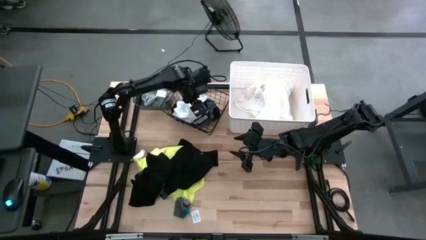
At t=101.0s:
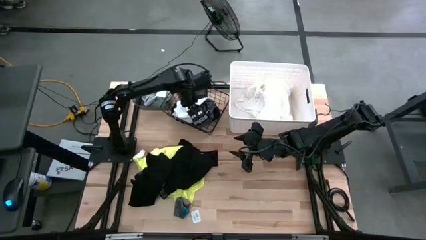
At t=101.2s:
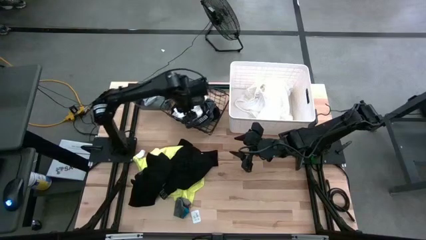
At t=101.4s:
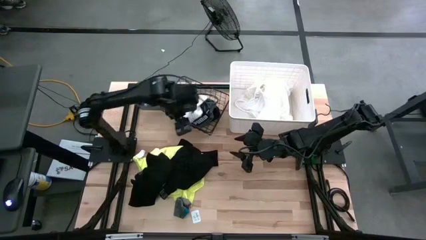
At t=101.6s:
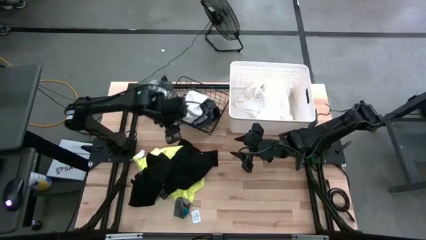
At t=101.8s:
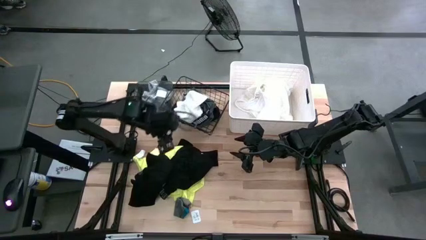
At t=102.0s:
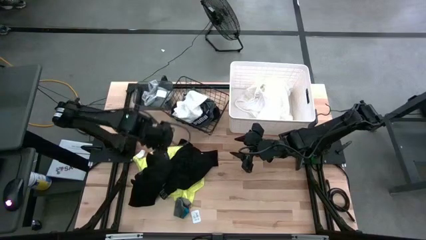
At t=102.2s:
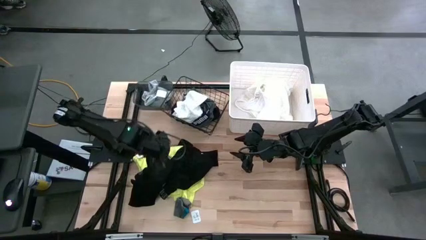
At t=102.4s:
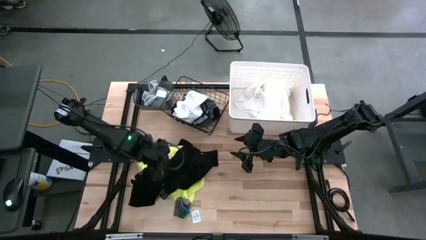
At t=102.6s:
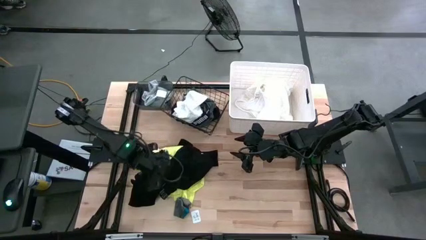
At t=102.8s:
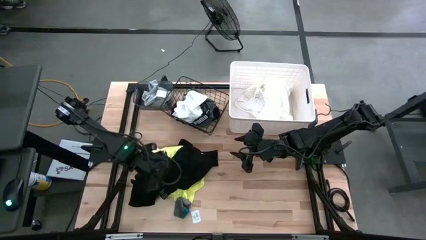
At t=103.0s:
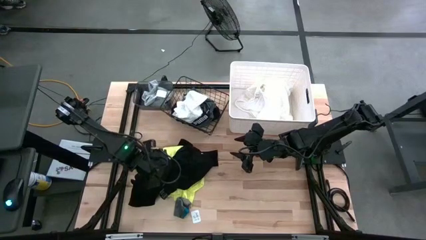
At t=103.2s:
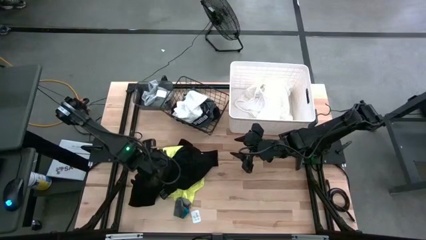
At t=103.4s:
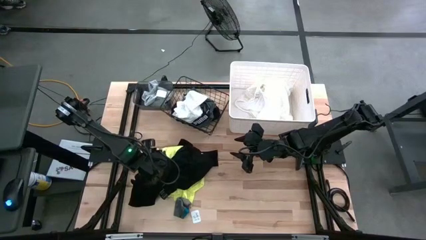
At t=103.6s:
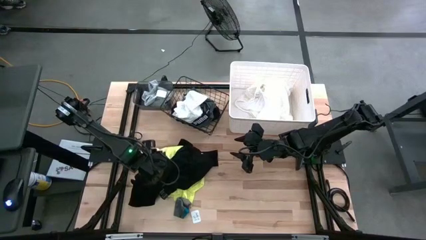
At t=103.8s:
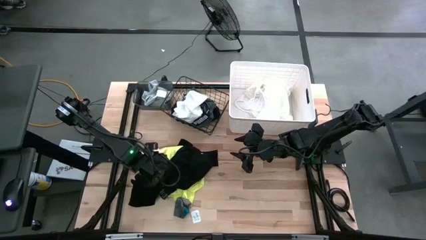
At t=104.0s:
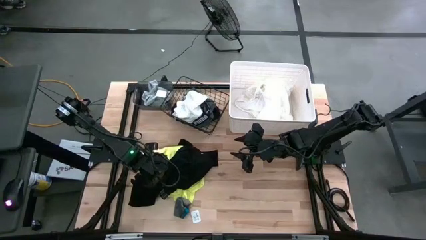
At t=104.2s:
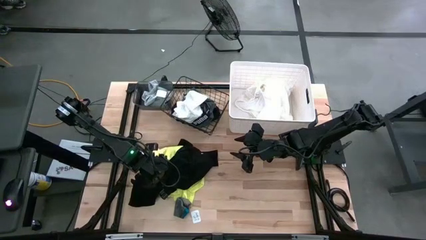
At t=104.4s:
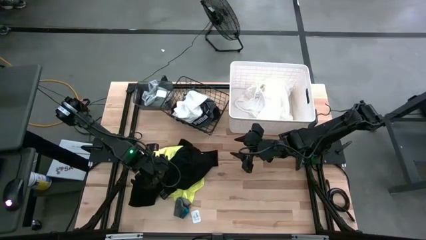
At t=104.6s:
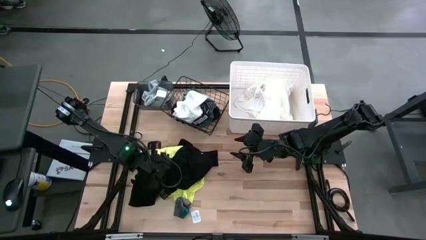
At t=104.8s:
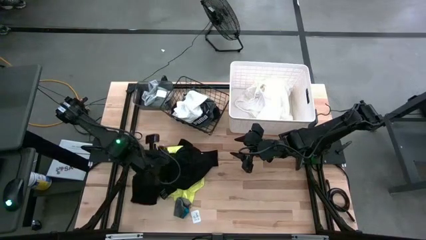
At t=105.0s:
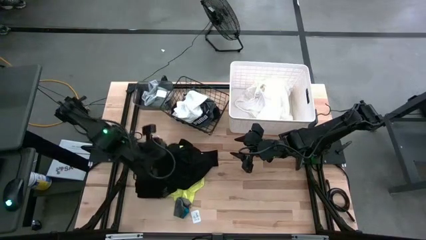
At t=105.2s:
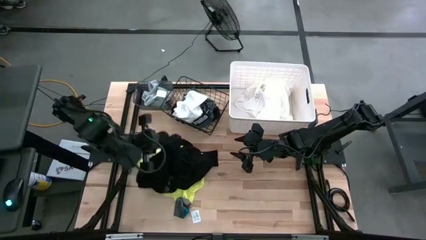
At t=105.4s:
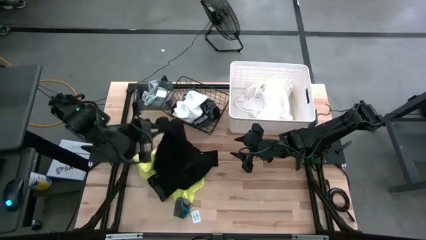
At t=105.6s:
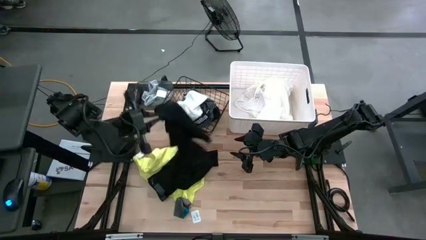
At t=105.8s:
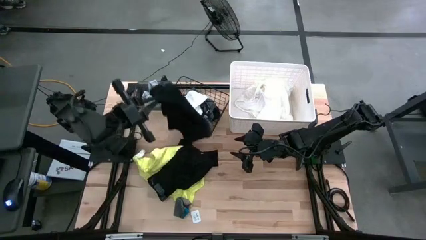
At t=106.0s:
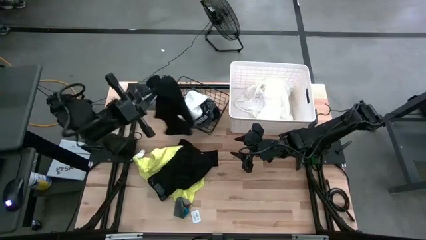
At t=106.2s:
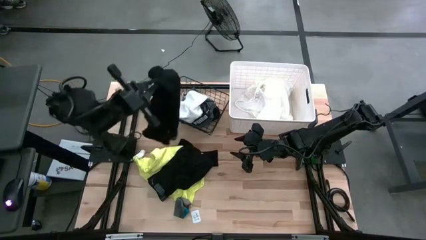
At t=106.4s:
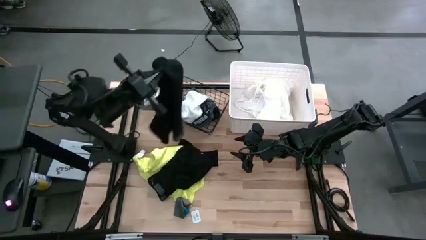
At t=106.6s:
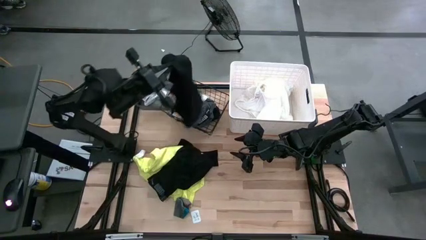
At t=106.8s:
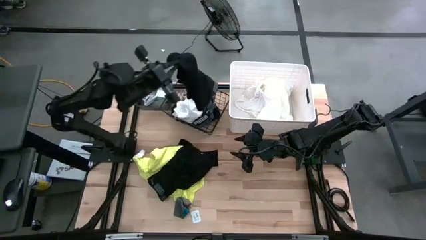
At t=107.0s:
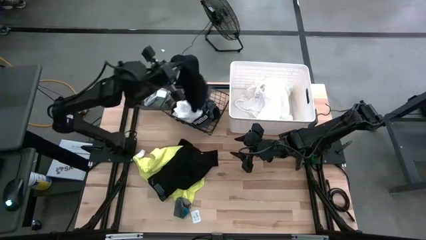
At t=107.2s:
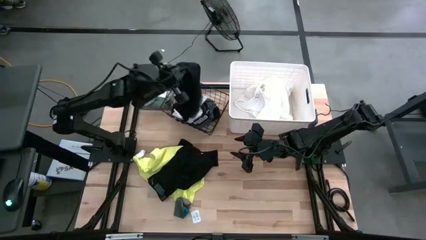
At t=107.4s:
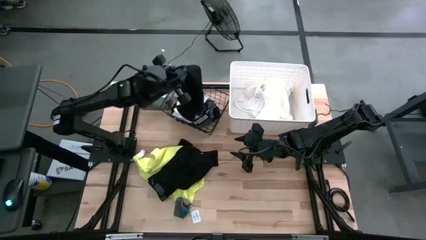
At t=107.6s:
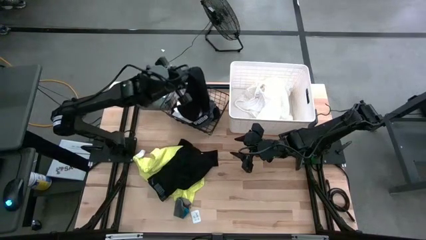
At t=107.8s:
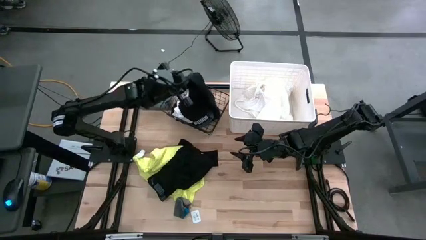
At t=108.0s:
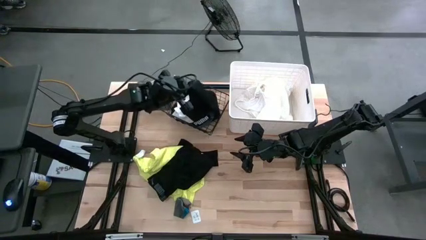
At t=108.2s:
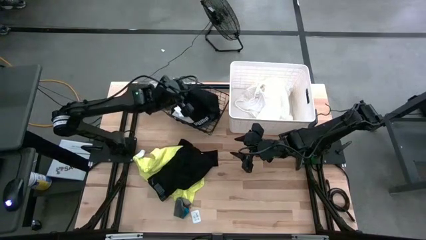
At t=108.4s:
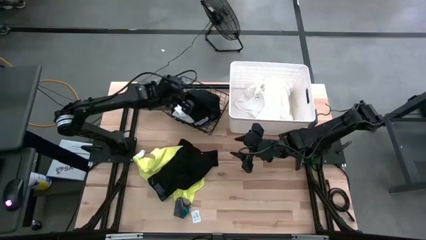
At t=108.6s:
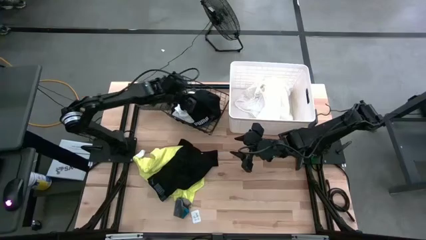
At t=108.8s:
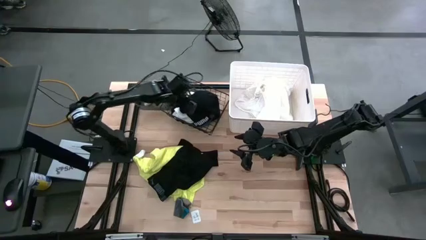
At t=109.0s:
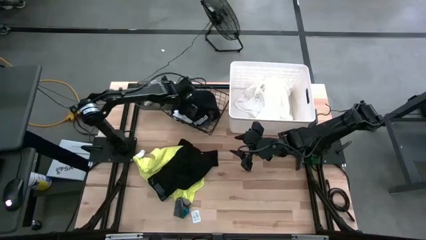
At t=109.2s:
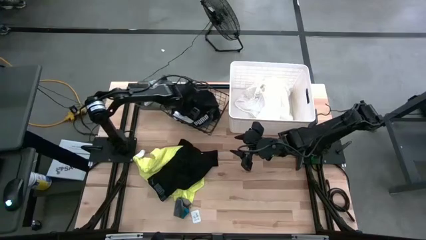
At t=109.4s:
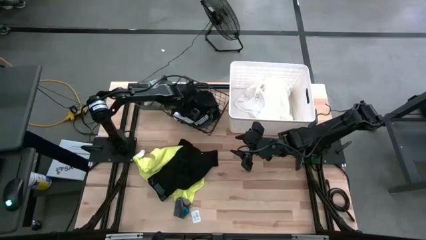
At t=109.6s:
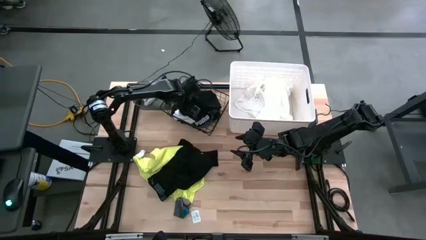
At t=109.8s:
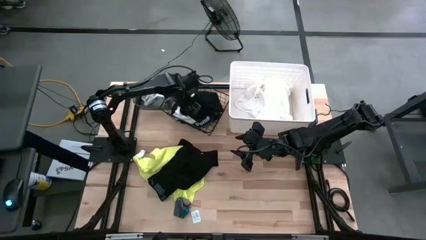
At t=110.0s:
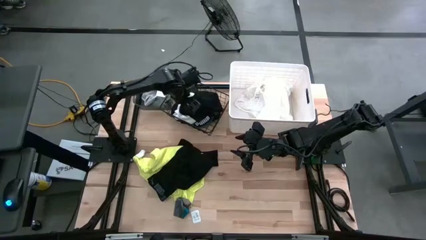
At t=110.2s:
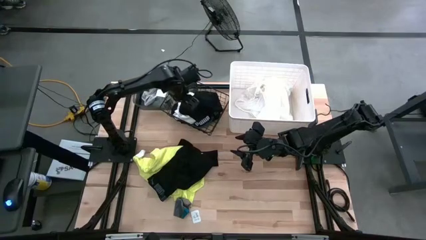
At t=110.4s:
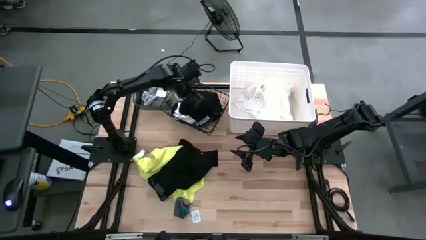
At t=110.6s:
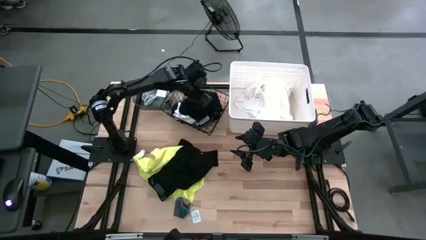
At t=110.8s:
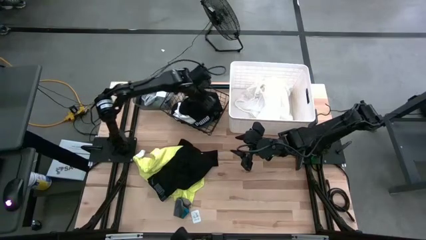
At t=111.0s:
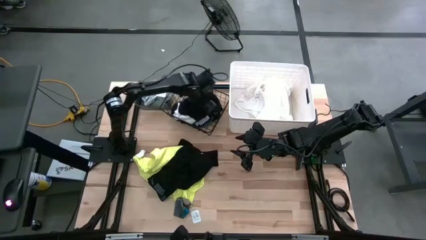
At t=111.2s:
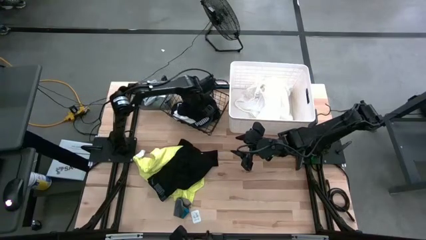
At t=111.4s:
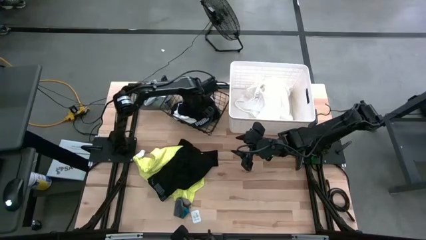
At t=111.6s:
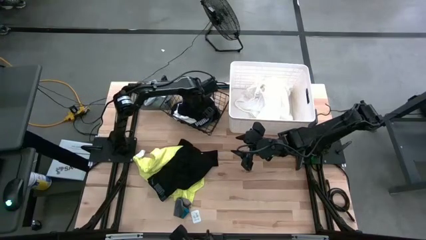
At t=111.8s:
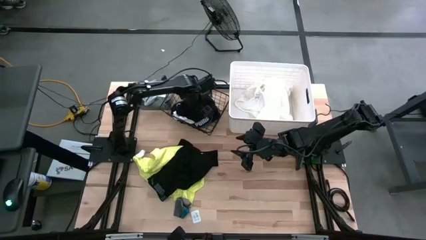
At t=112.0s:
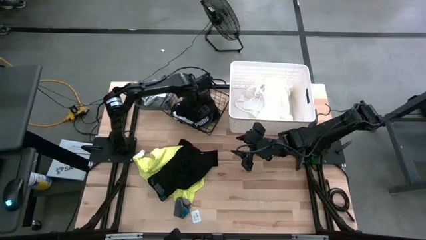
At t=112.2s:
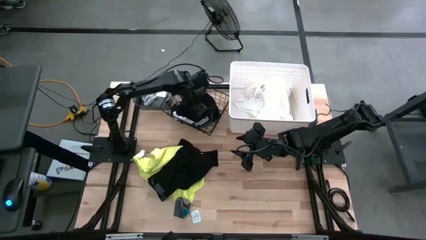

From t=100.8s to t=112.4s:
Task: Pick & Place Cloths
Put the black underwear into the wire basket

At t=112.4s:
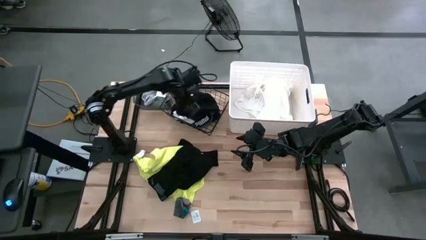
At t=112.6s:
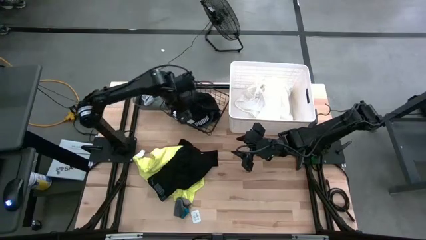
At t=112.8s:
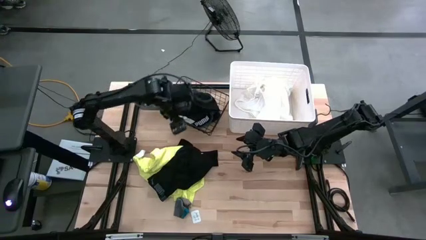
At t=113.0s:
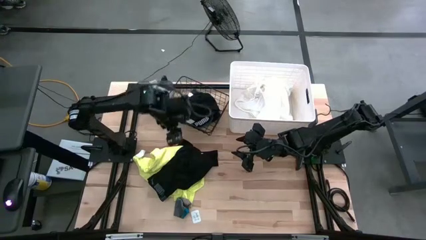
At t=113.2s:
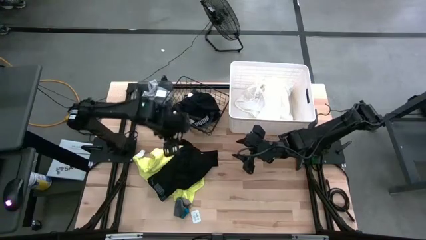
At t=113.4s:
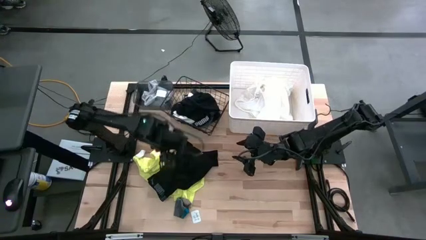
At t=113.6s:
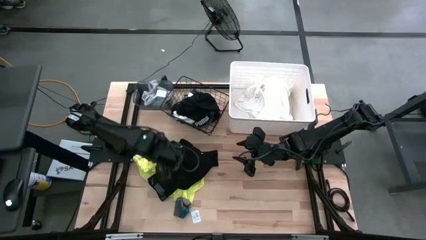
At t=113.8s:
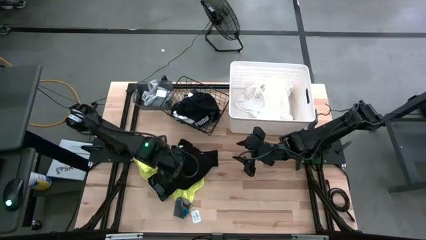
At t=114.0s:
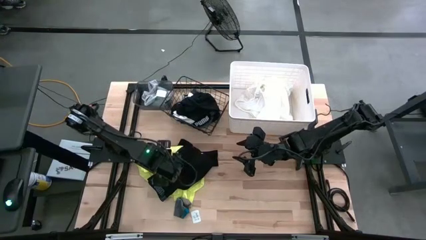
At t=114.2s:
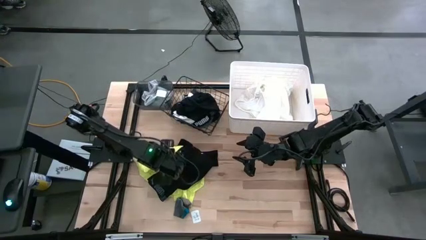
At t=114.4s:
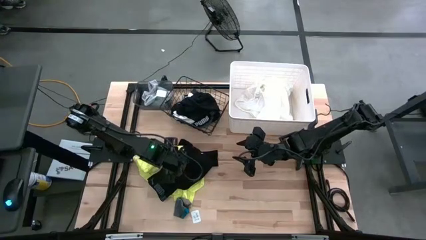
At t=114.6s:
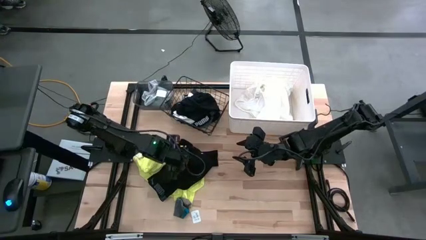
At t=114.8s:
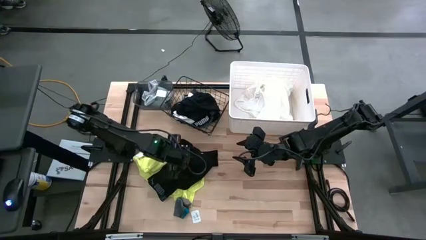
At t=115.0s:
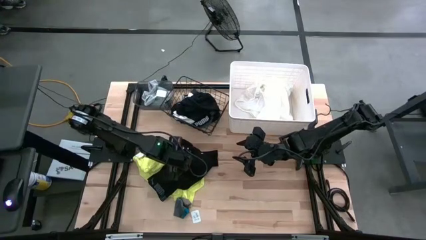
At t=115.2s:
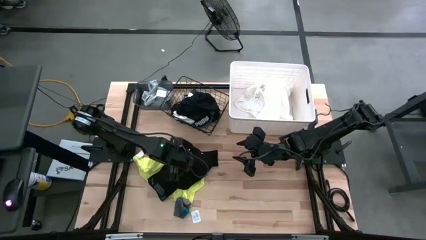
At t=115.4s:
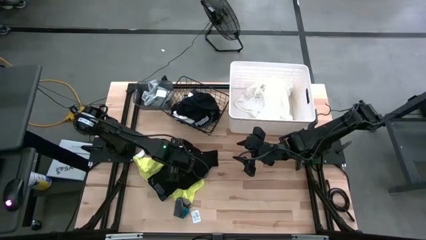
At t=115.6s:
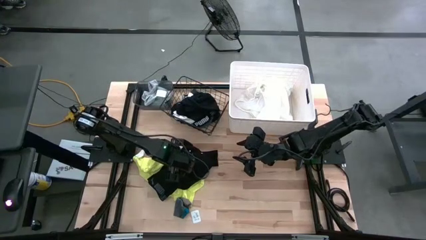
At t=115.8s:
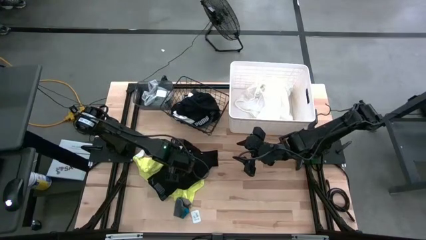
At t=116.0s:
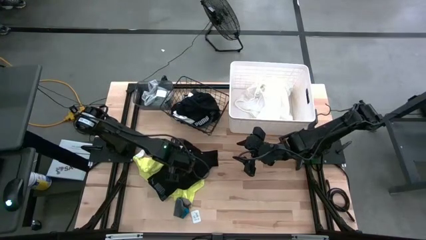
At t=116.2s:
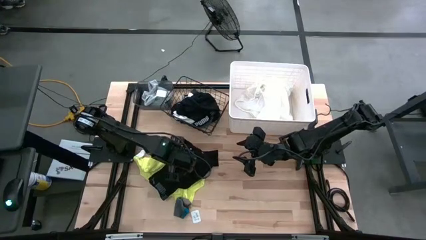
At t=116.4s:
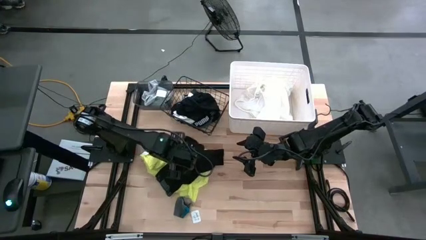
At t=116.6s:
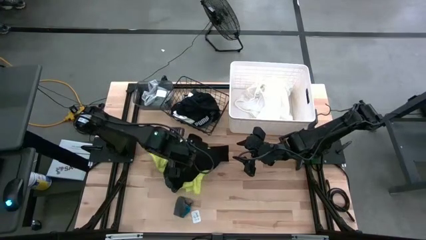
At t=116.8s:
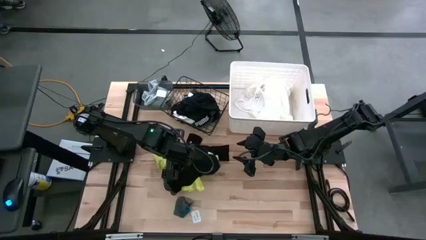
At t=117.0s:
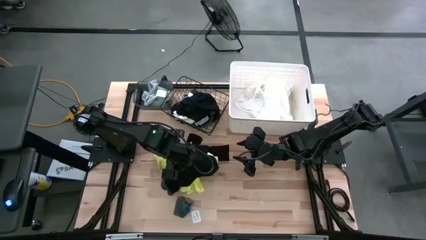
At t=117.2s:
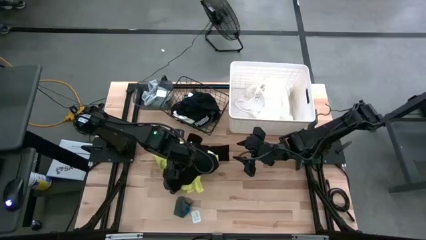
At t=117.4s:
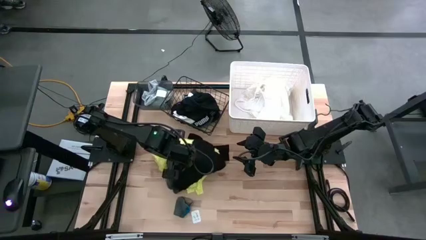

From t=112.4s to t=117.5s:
Put the black underwear into the wire basket
